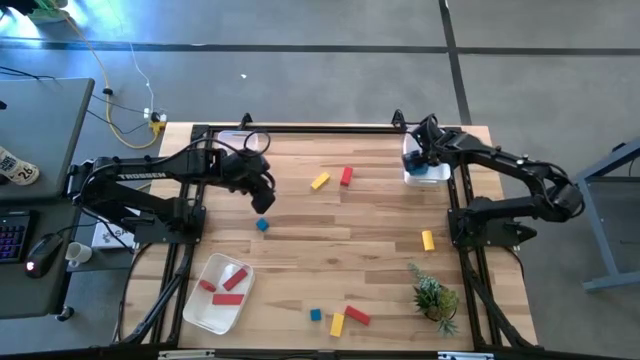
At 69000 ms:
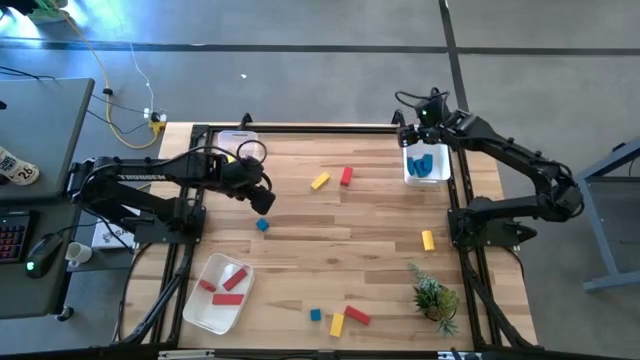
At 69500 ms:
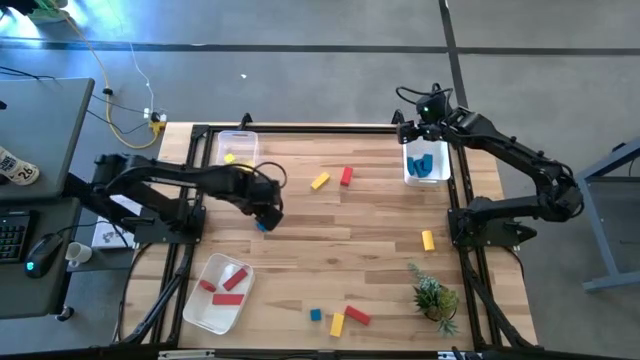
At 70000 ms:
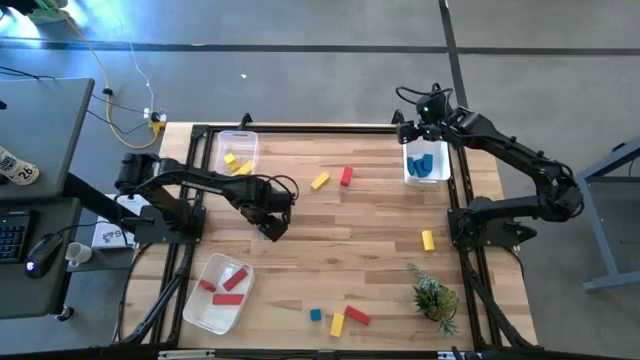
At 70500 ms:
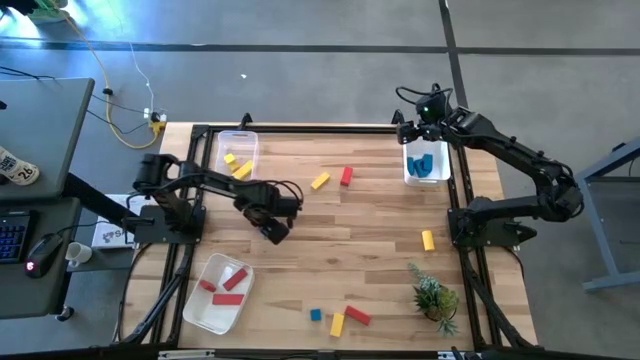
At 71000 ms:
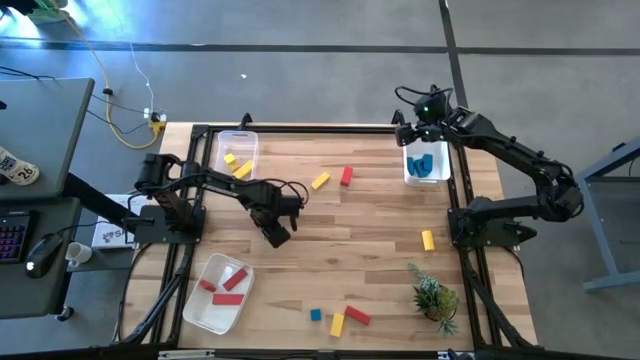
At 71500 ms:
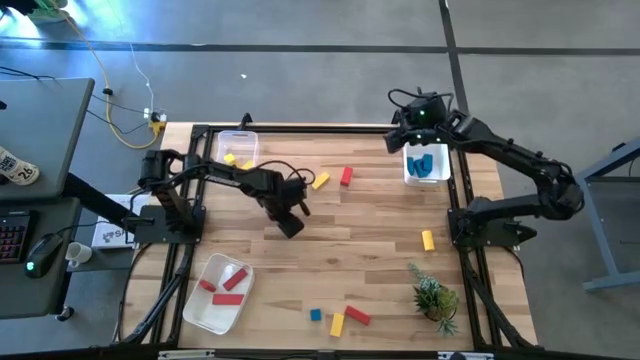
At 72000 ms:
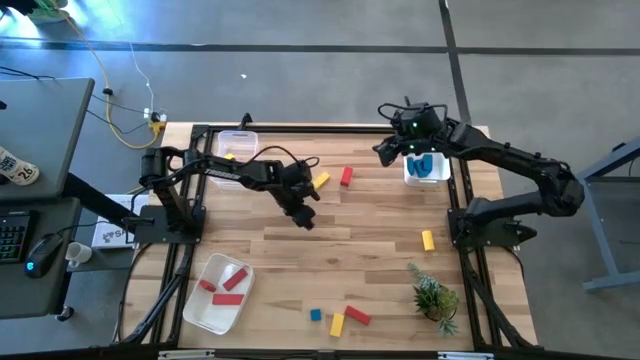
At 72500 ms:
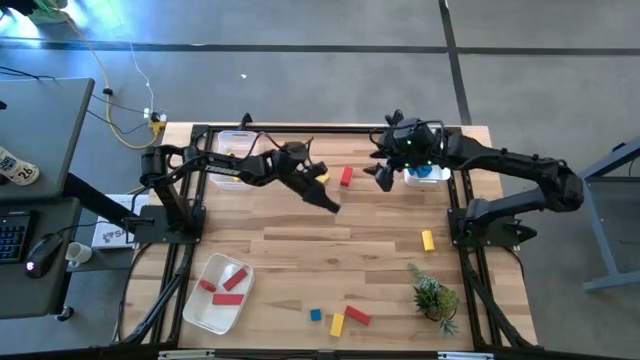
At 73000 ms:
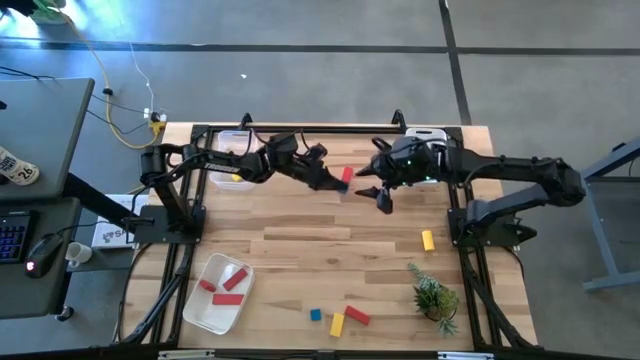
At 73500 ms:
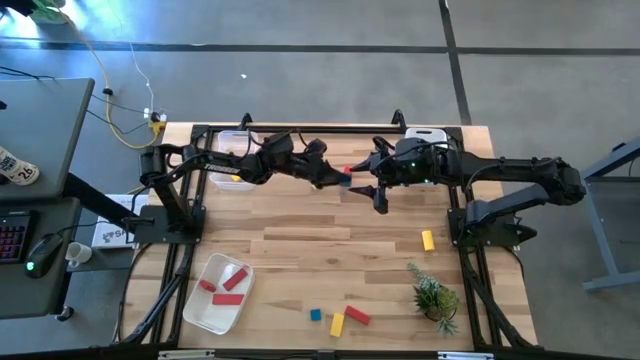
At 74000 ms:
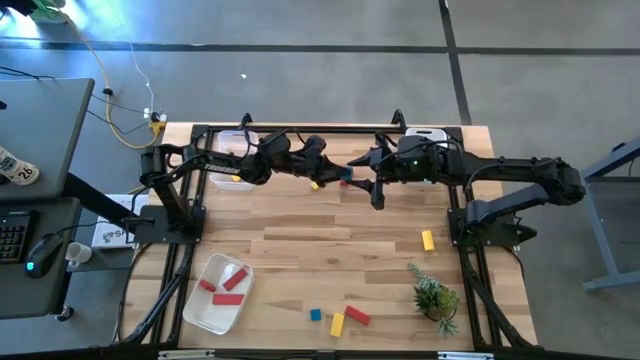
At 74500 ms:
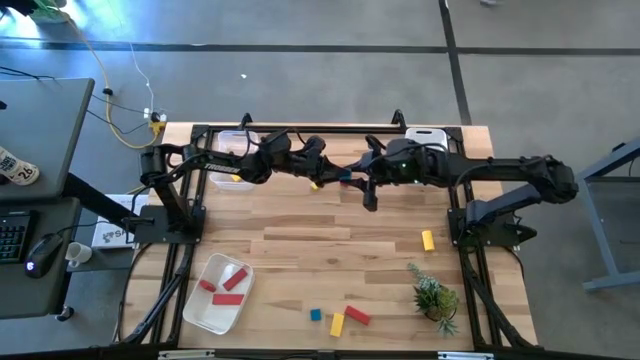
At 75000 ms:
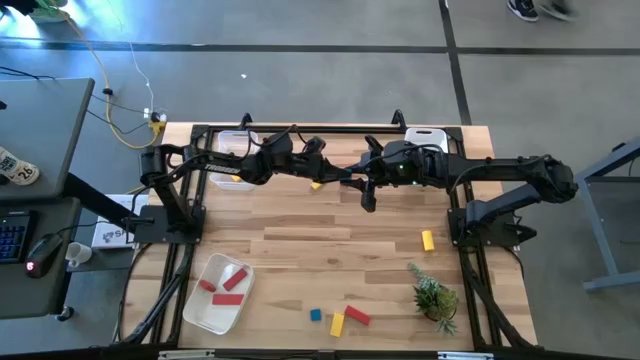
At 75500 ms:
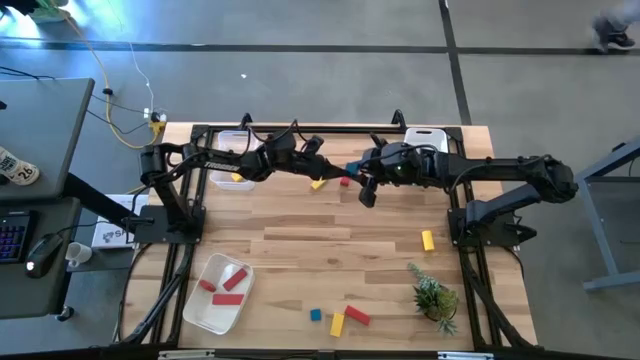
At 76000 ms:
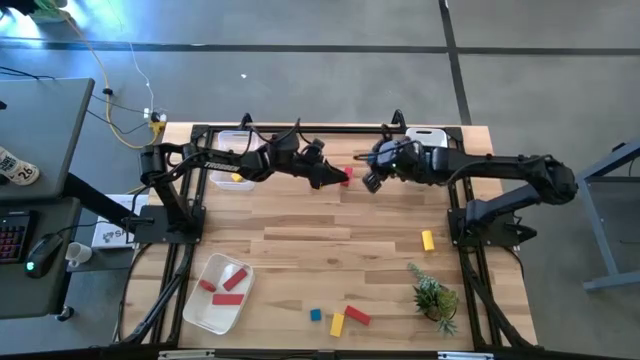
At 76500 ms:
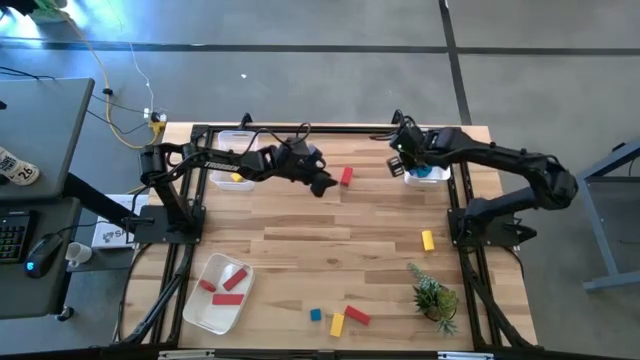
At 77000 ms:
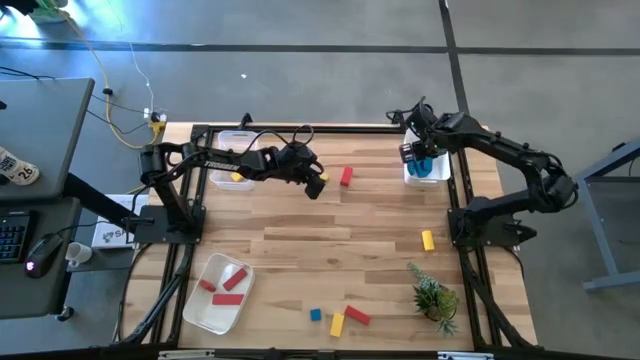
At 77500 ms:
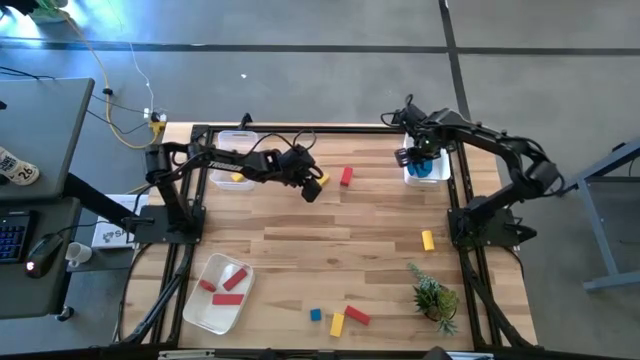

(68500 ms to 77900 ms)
Task: Sort & place blocks by color
Put the blue block into the top white bin

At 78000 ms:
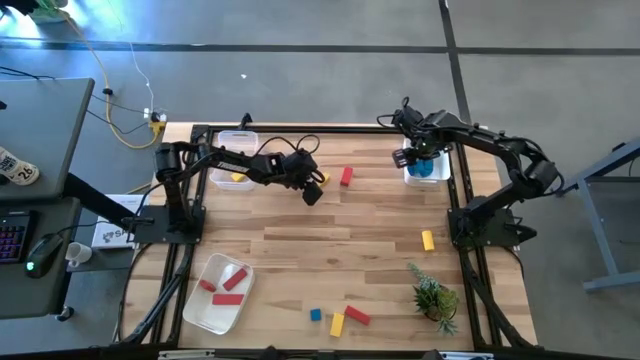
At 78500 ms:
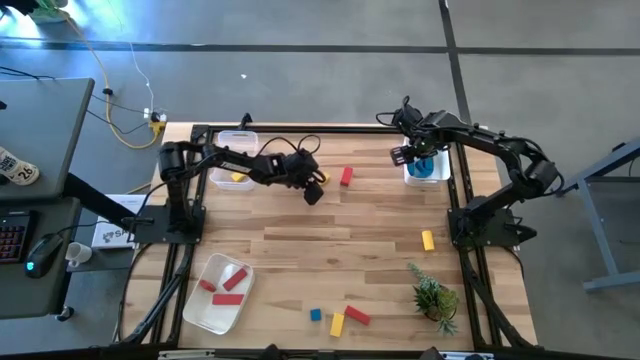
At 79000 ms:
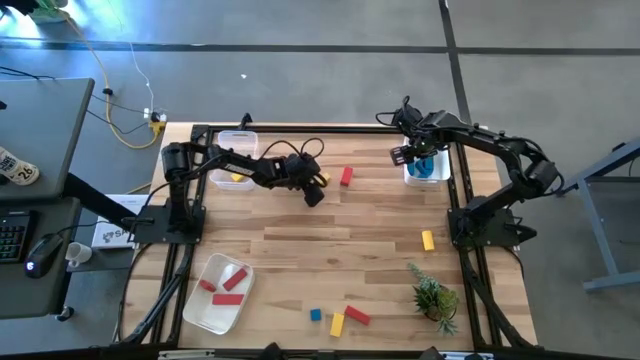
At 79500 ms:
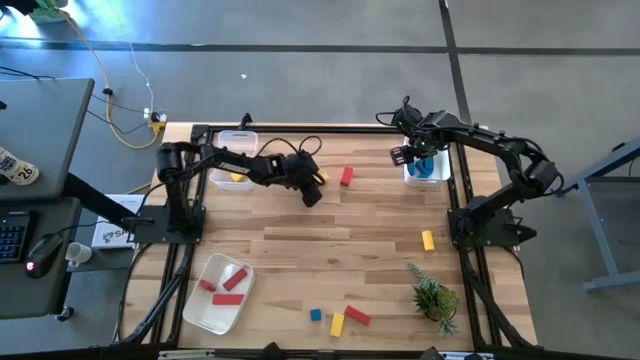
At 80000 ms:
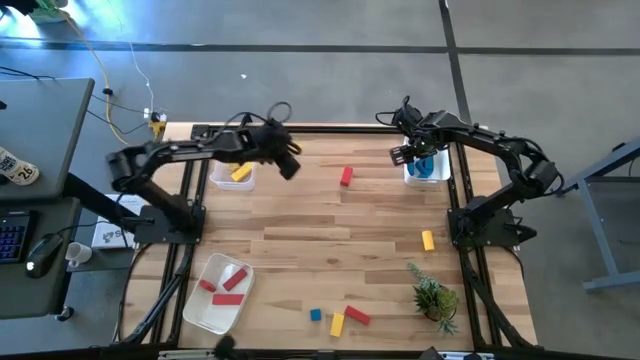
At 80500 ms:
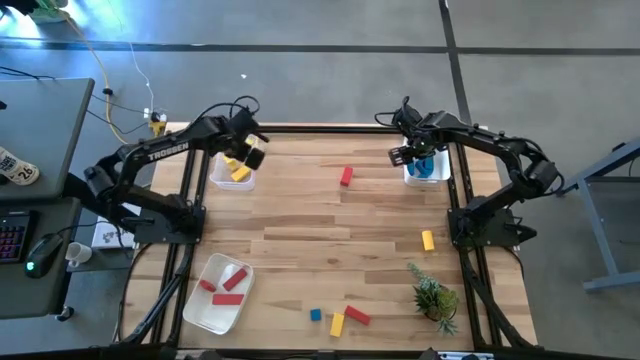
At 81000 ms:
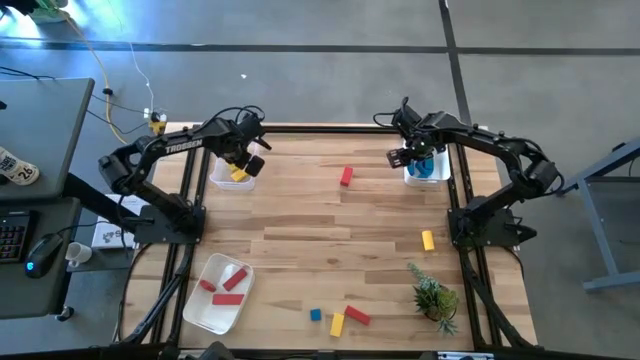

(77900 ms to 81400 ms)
Put the yellow block into the transparent bin

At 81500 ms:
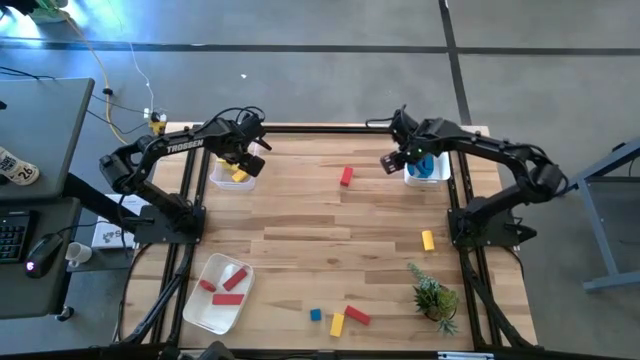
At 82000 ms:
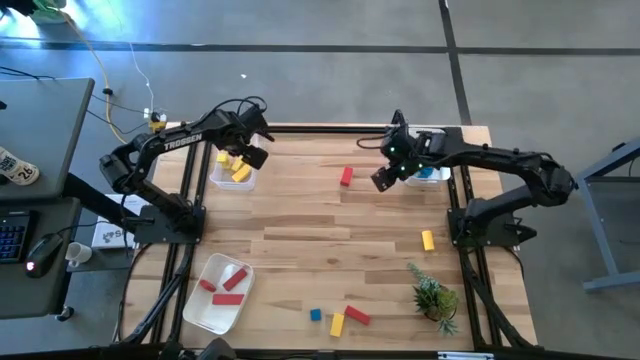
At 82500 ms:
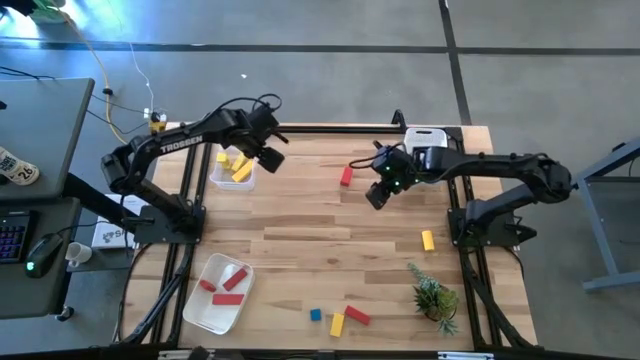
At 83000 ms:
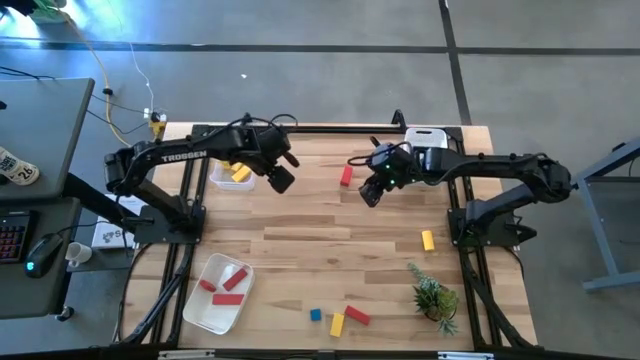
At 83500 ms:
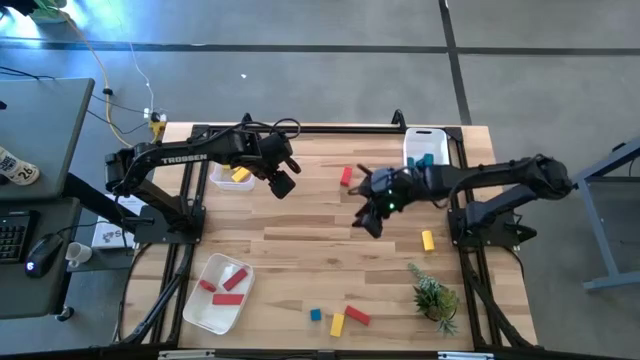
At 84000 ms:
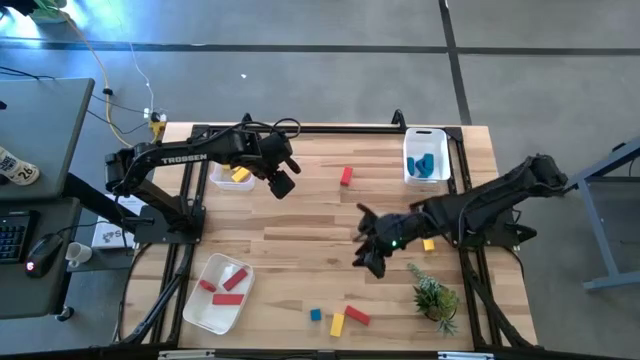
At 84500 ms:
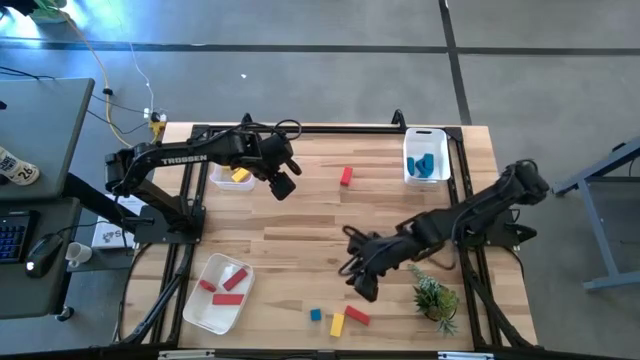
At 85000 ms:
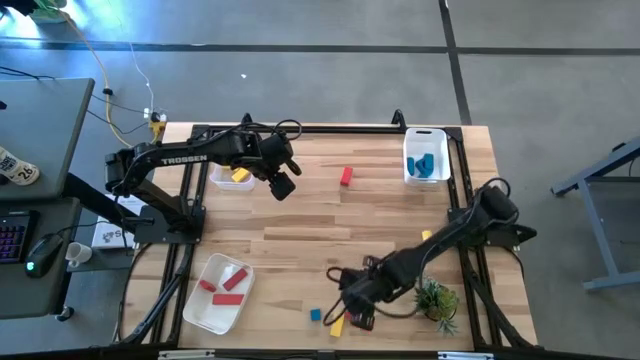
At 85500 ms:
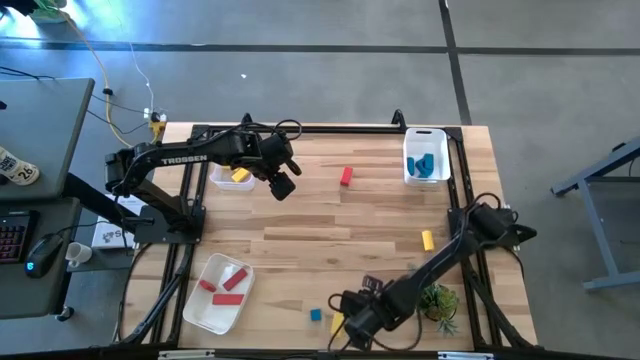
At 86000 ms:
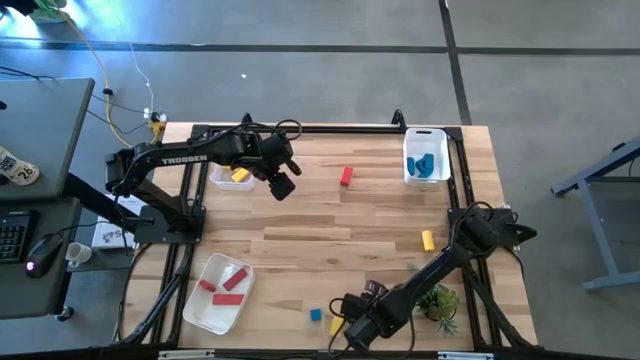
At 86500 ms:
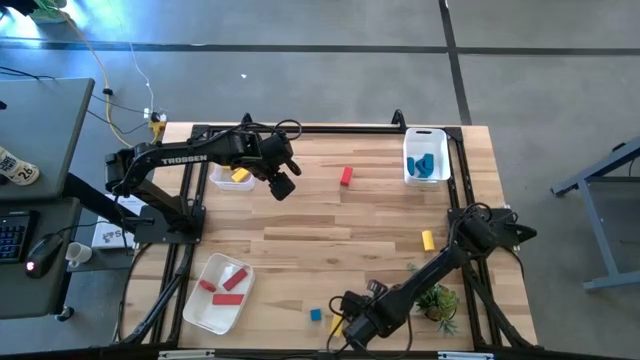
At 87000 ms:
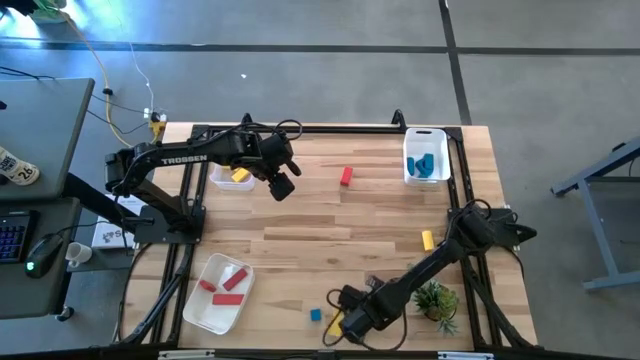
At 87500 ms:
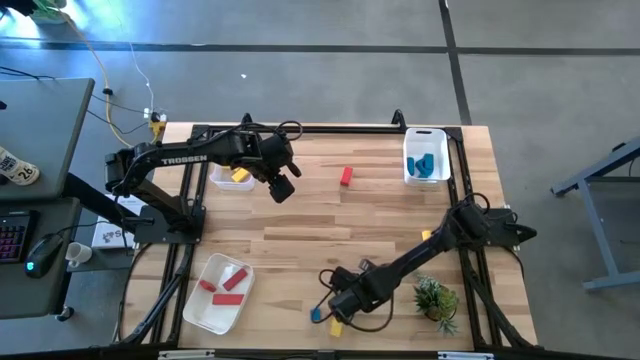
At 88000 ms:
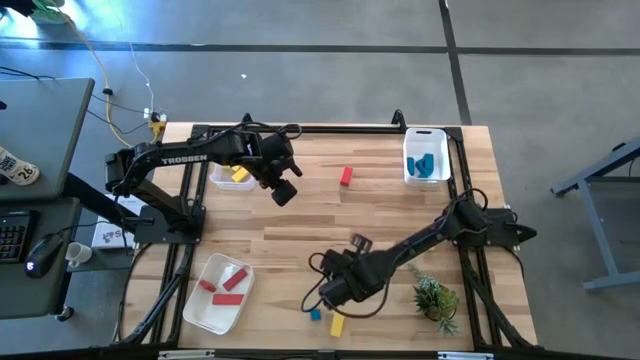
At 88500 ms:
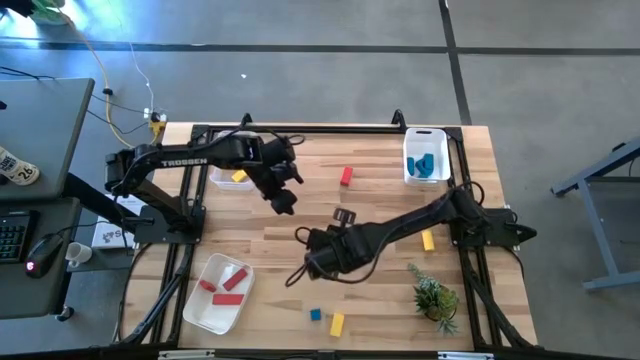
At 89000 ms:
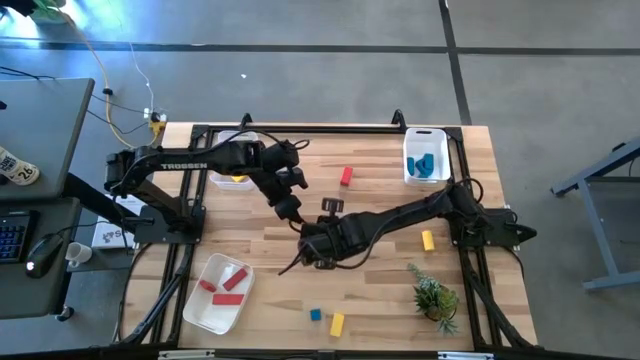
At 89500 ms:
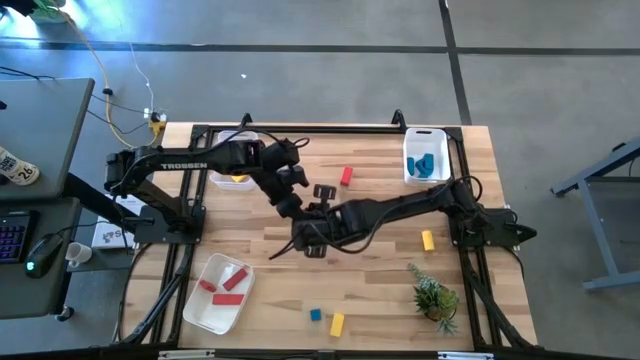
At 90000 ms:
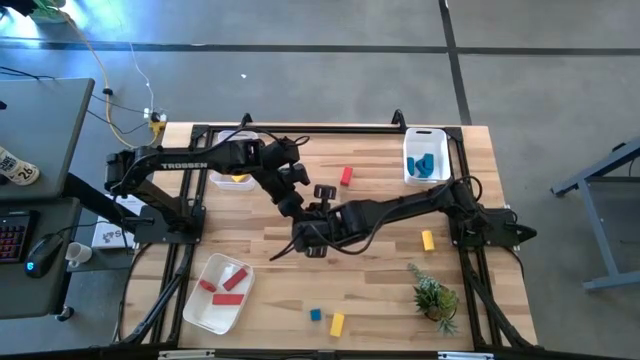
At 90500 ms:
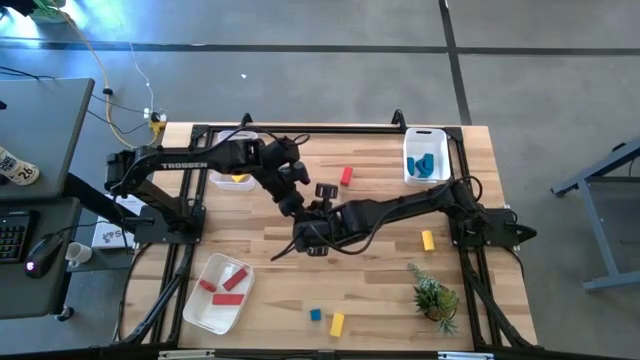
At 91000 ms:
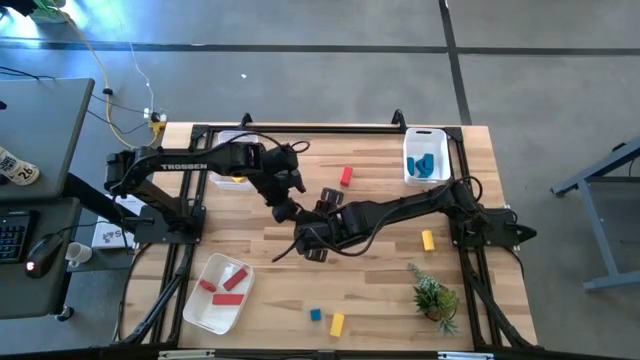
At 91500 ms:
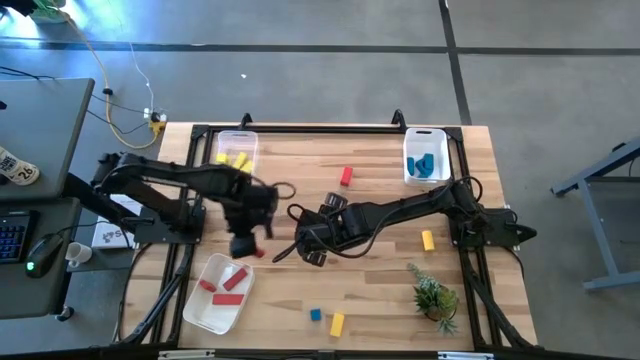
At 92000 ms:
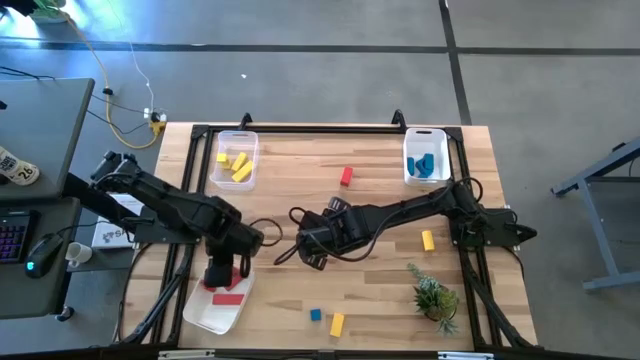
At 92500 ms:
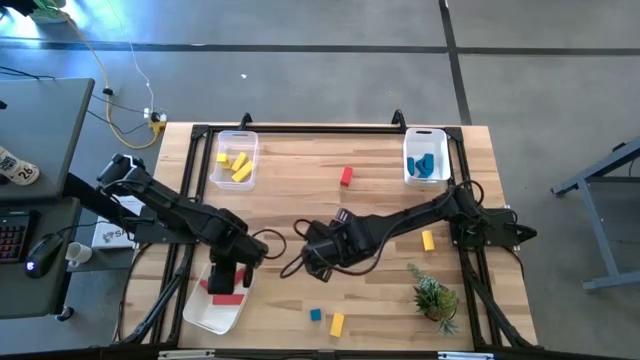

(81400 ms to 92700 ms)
Put the red block into the bottom white bin
